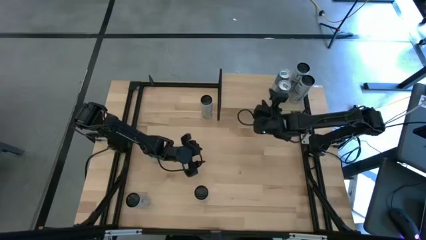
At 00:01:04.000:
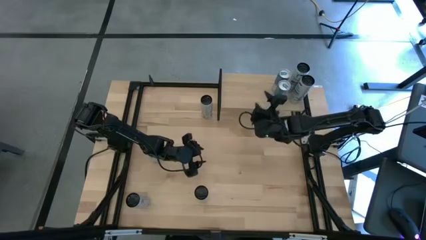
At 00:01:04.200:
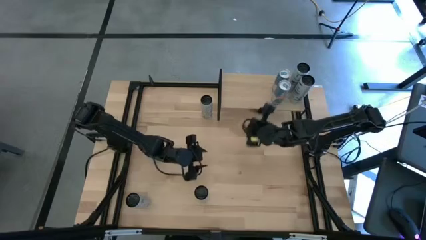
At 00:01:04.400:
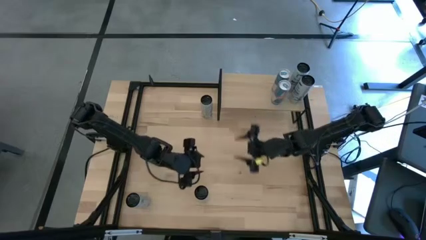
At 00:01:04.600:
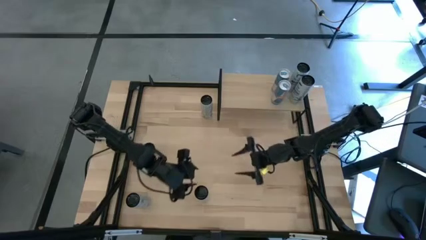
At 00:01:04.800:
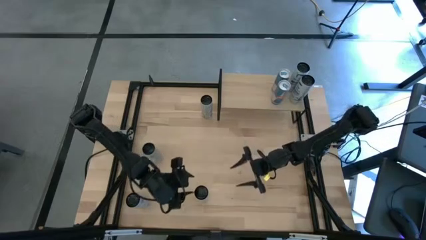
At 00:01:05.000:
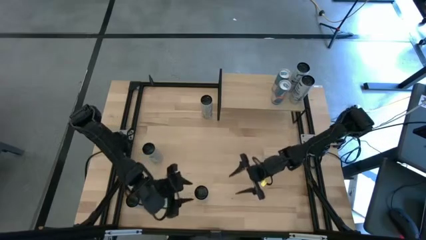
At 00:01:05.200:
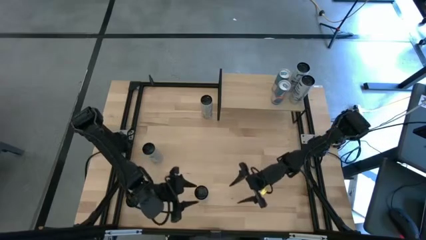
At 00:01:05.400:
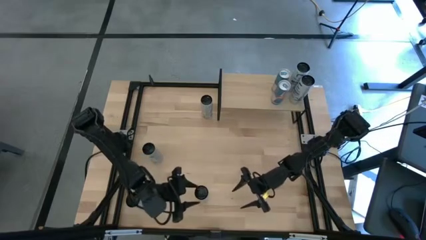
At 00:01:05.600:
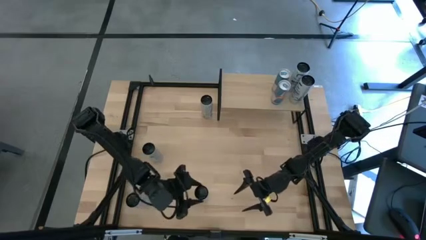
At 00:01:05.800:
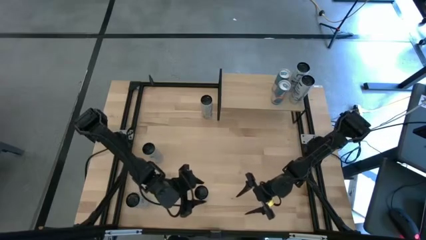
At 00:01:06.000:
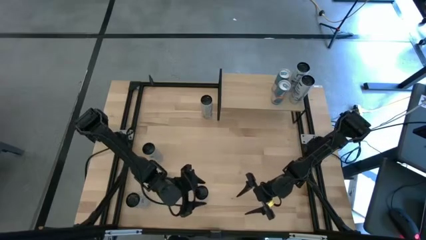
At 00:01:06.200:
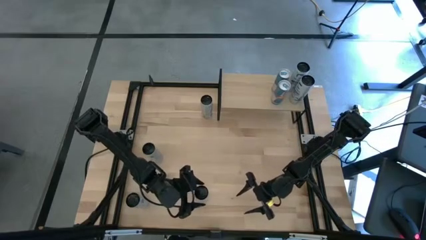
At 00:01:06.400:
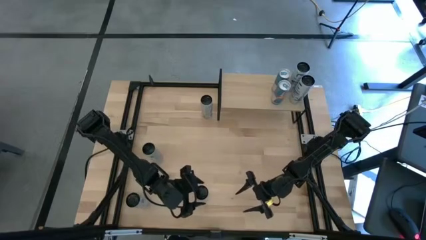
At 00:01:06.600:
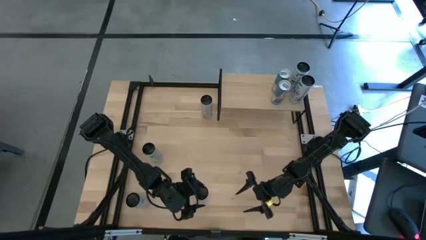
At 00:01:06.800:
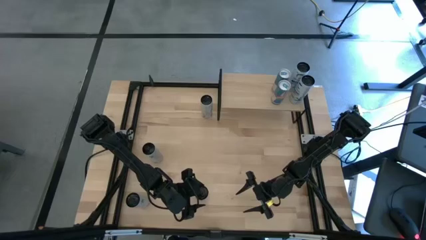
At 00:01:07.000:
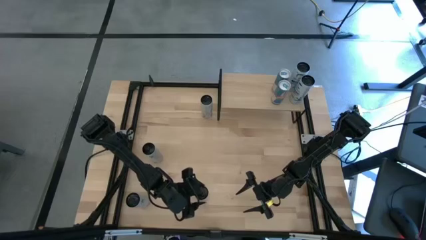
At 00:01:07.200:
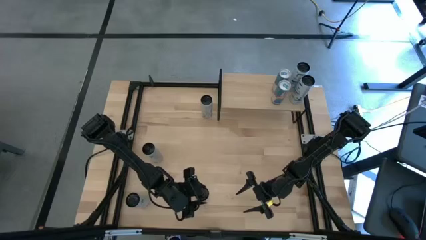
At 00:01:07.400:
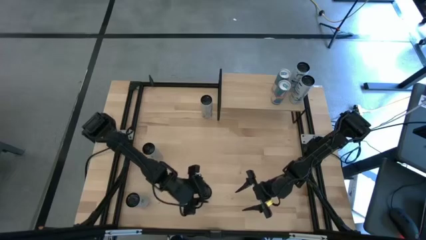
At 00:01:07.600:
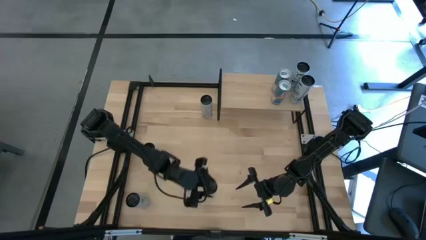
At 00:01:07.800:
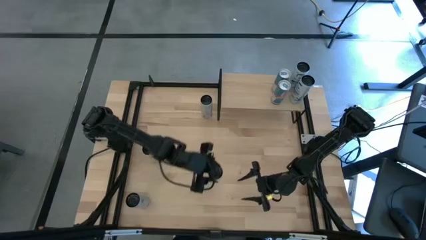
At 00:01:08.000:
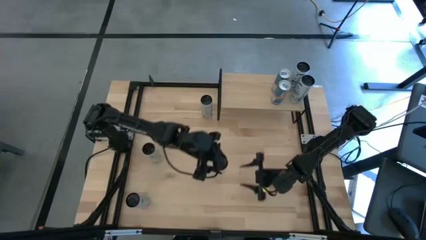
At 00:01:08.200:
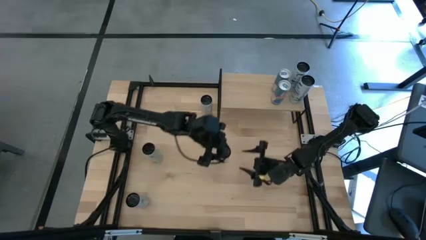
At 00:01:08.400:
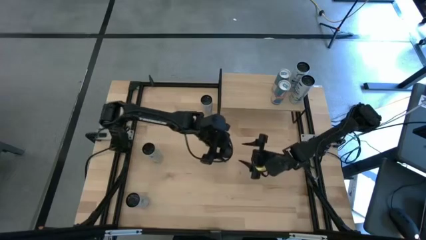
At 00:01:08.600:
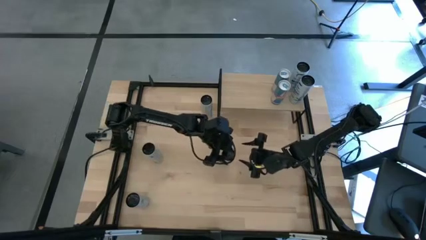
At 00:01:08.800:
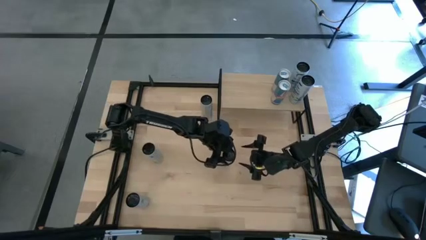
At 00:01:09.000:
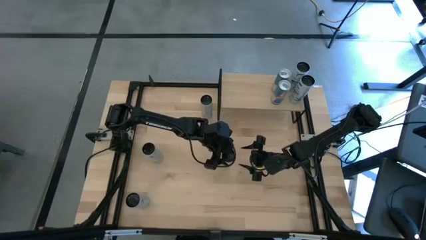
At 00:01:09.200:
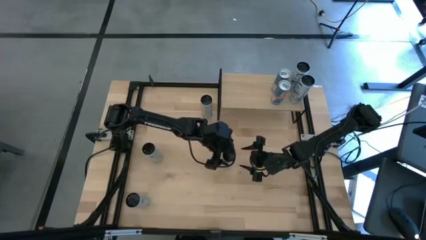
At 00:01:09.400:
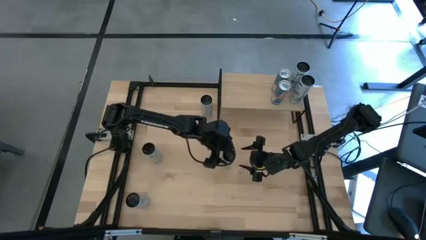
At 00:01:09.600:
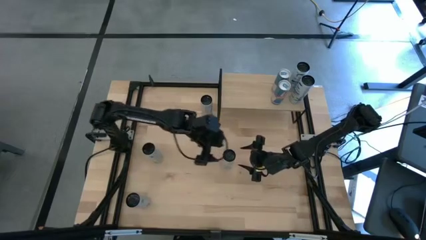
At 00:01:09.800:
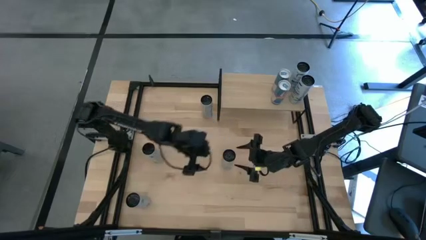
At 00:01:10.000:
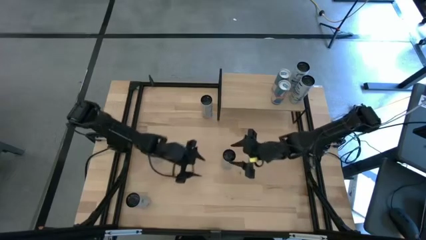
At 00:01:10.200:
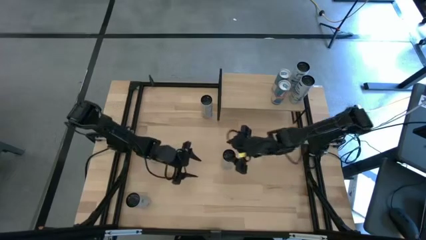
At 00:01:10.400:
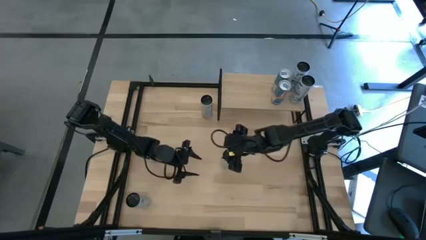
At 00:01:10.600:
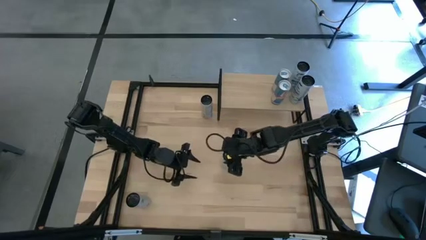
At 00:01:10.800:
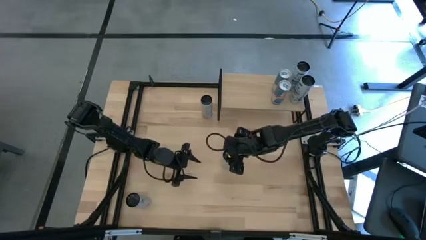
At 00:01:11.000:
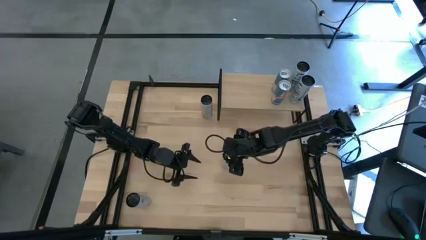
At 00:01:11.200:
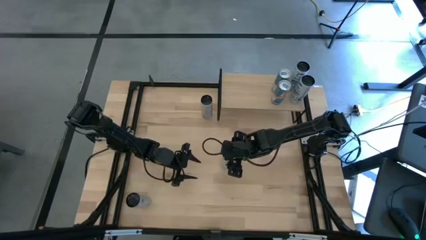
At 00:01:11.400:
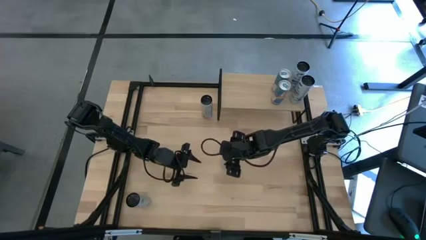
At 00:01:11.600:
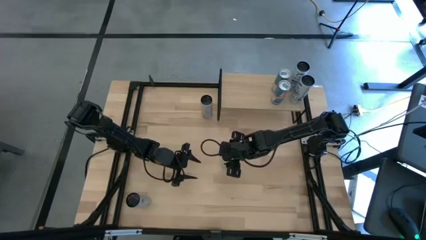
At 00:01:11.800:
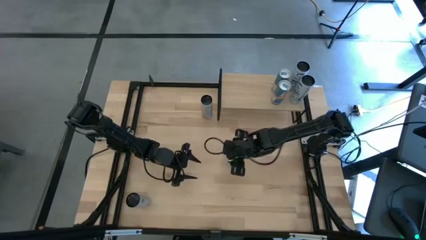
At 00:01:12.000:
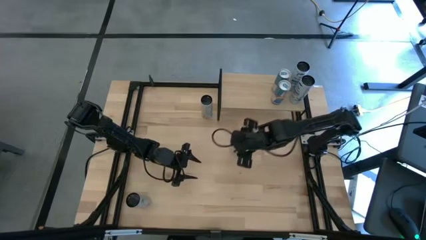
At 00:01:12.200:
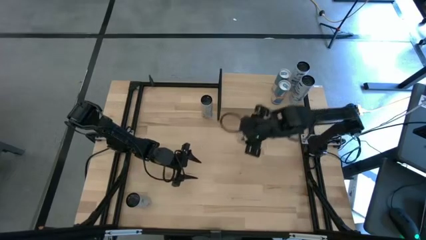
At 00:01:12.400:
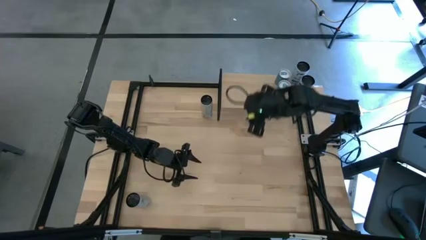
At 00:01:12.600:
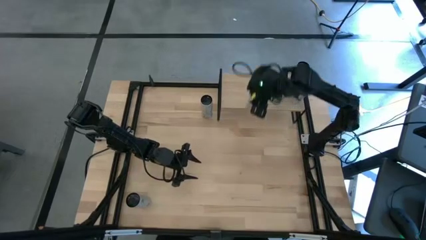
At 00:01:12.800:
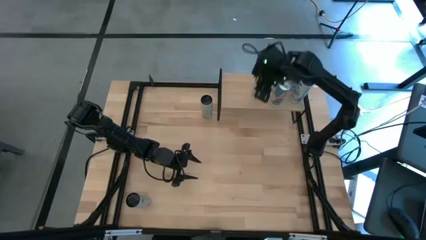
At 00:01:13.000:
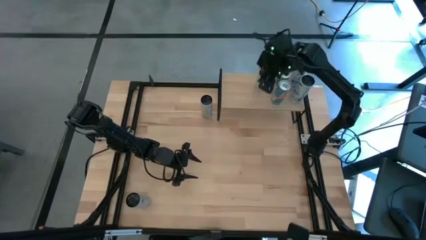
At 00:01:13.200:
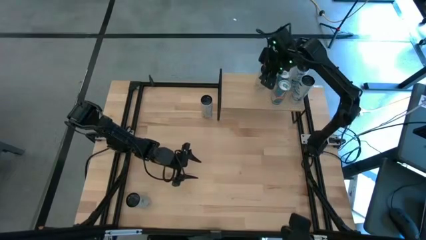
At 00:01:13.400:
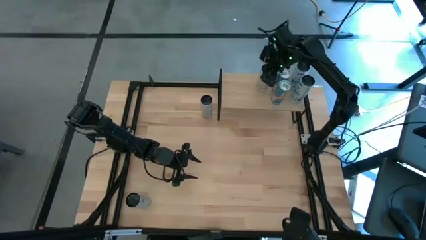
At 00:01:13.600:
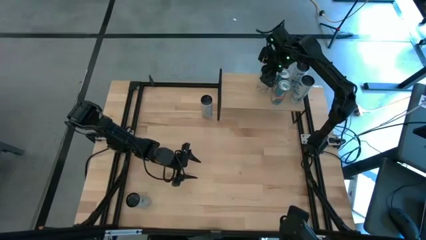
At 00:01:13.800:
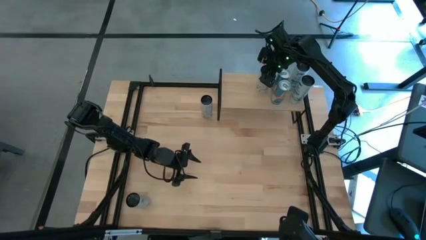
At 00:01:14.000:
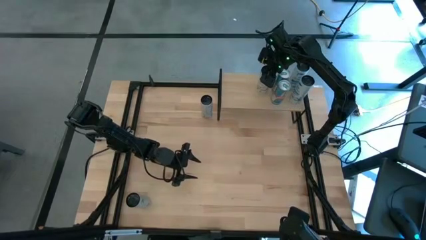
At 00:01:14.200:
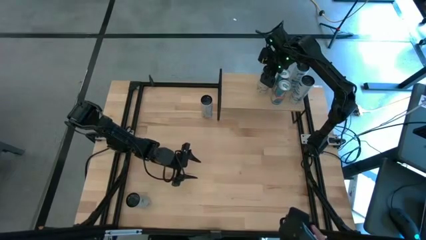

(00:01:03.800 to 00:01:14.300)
Task: Place canned beverage on shelf
Put the white and yellow soda can on the shelf
